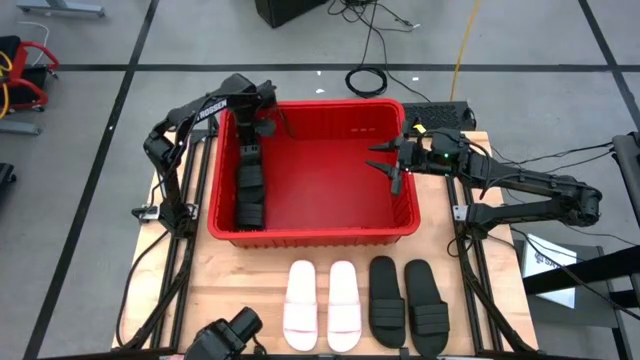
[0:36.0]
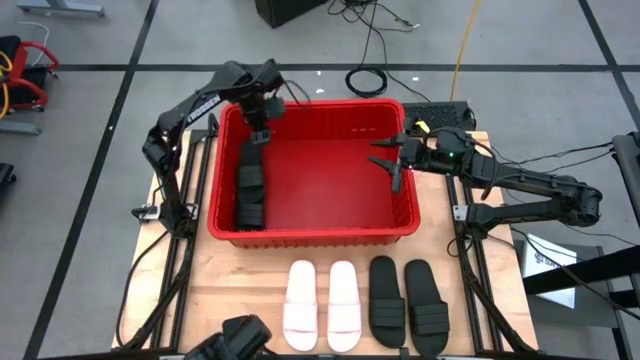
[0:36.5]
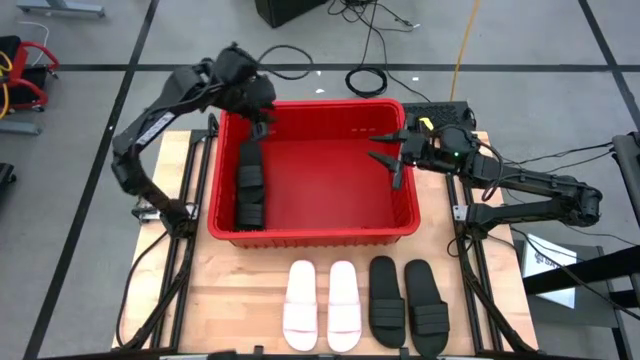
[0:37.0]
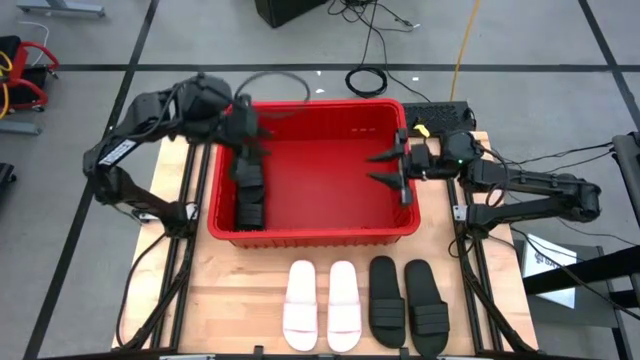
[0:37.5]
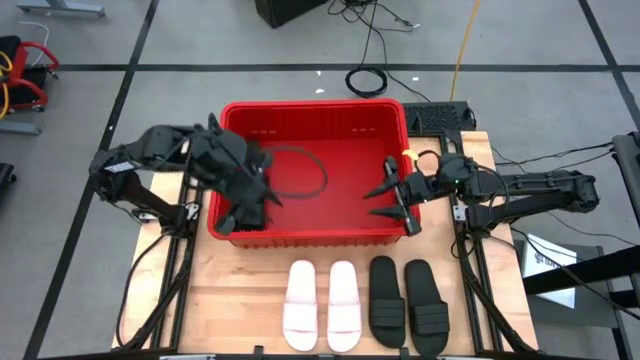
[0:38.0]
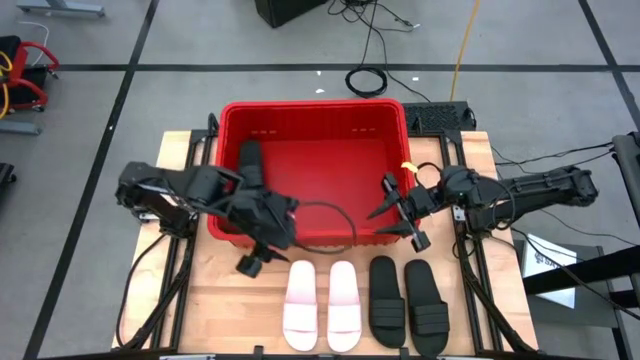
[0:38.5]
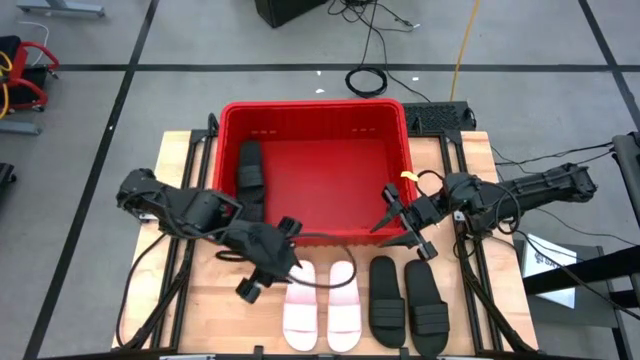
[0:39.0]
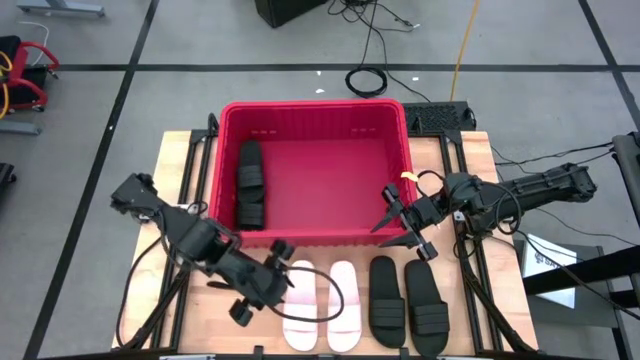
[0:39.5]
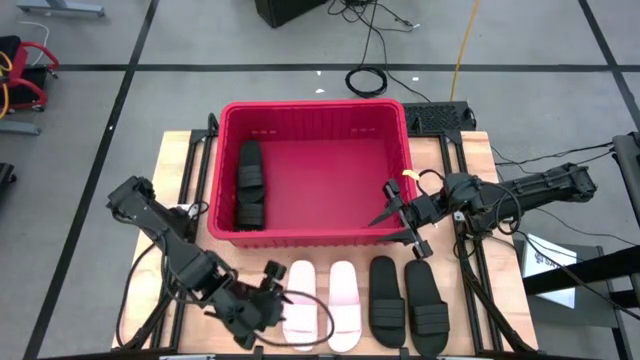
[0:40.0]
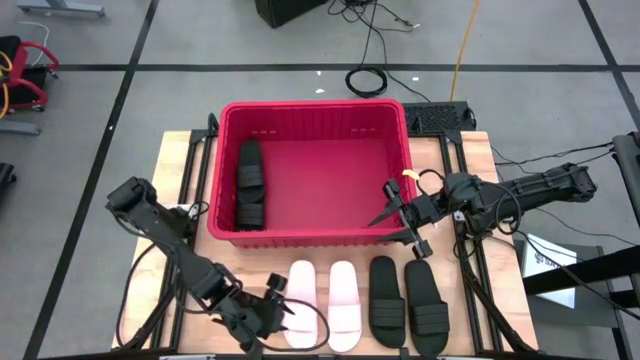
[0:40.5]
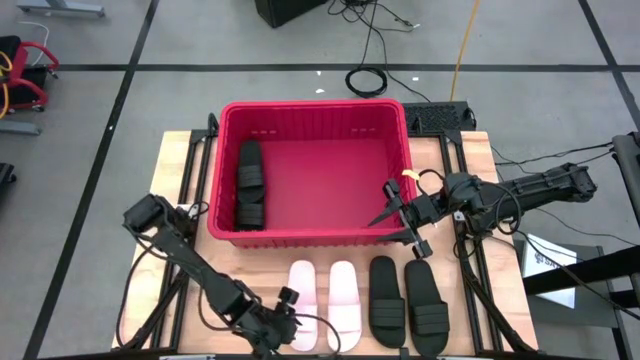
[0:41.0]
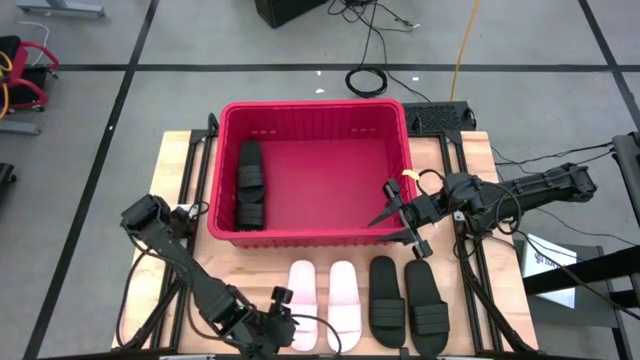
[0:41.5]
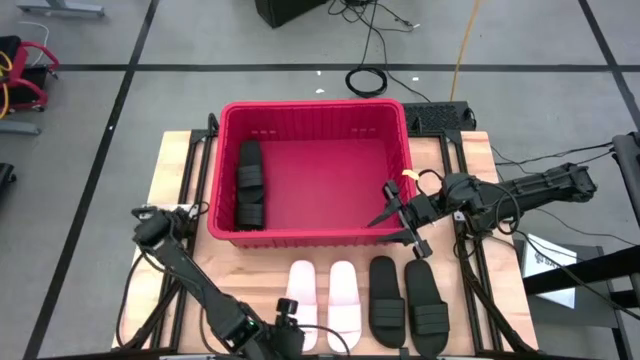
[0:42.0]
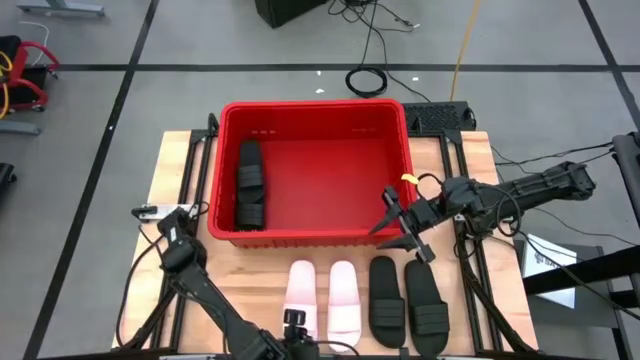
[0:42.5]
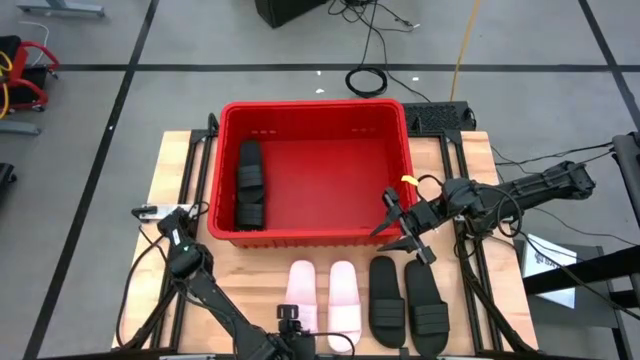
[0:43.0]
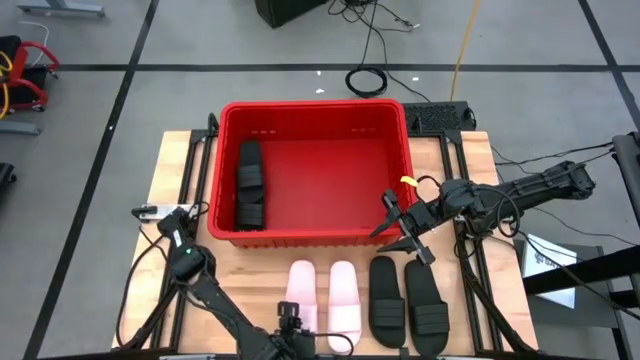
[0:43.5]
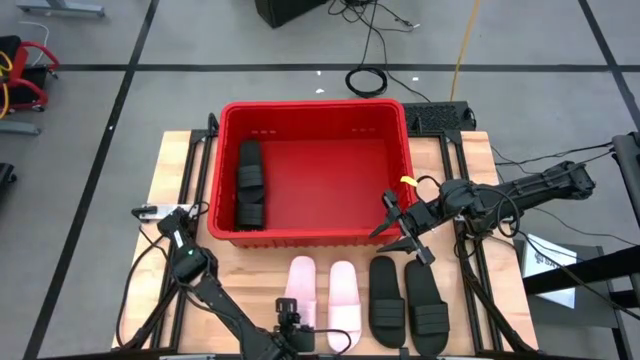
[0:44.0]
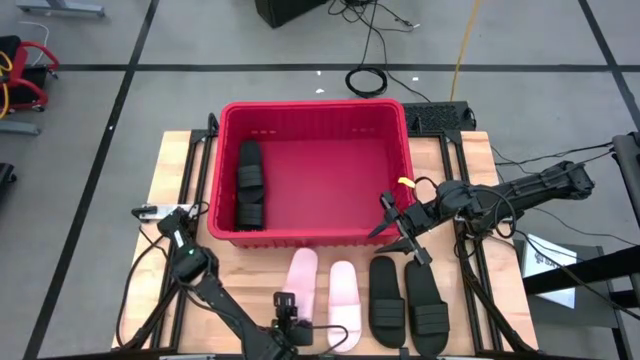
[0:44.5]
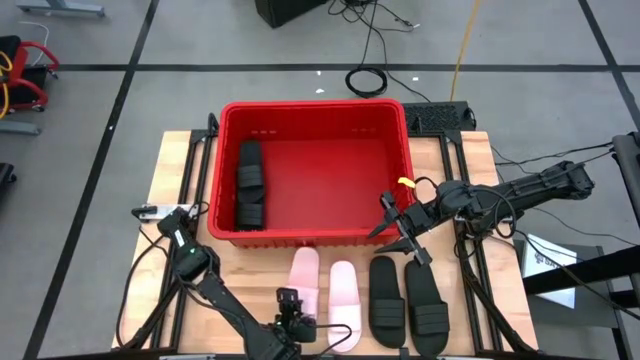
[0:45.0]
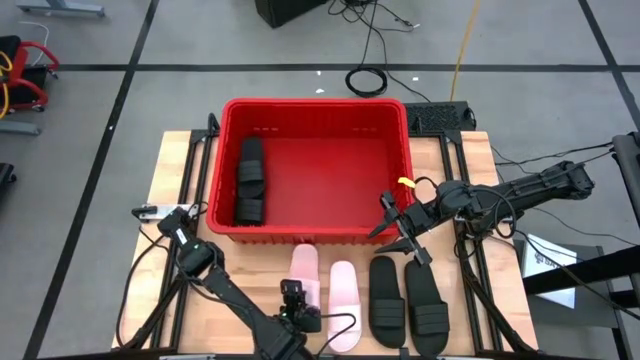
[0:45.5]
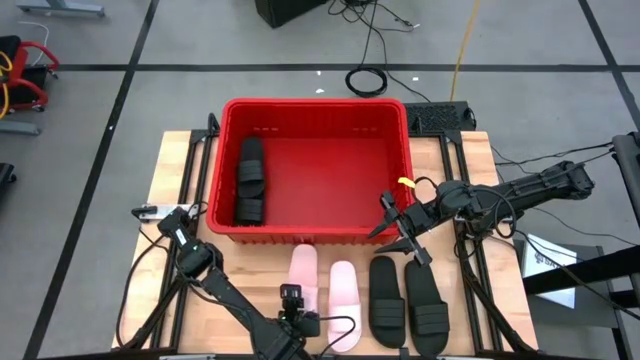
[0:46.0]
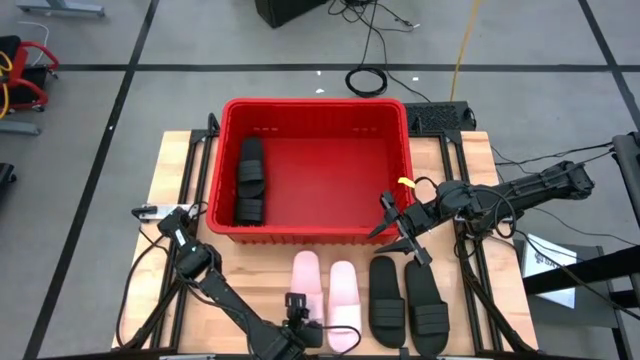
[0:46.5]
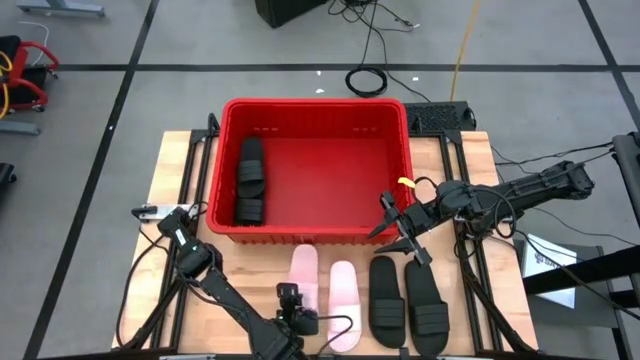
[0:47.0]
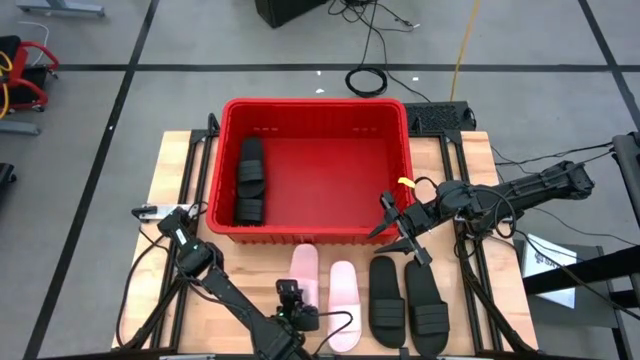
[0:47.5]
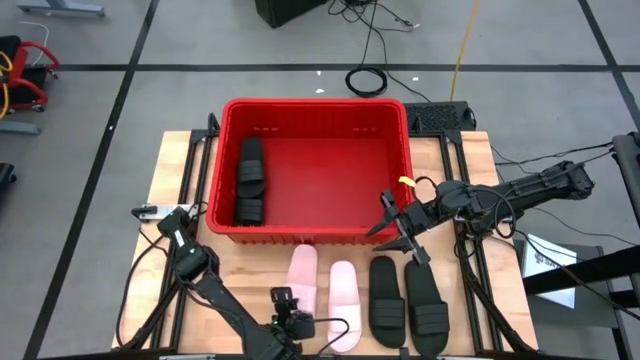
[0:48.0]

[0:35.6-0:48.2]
Task: Pick and place slides into bin
Put the white slipper into the red bin

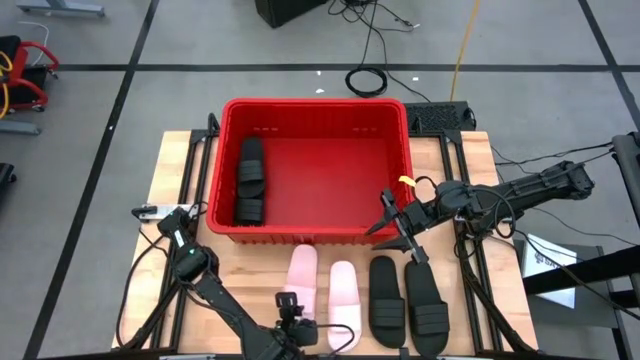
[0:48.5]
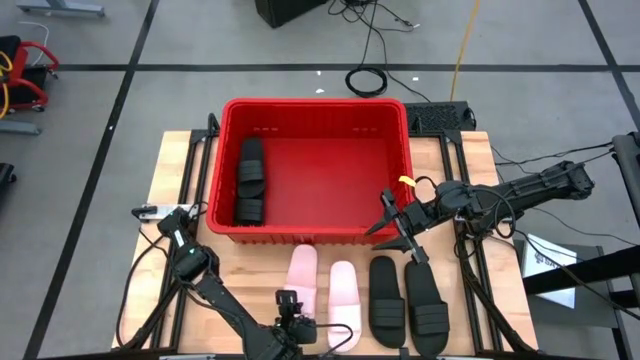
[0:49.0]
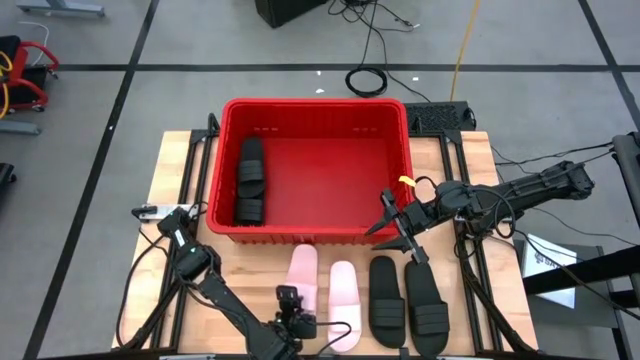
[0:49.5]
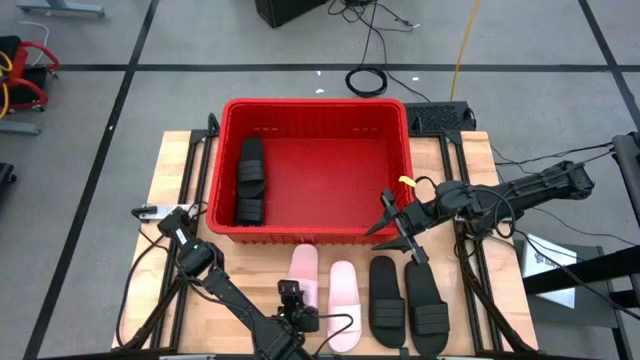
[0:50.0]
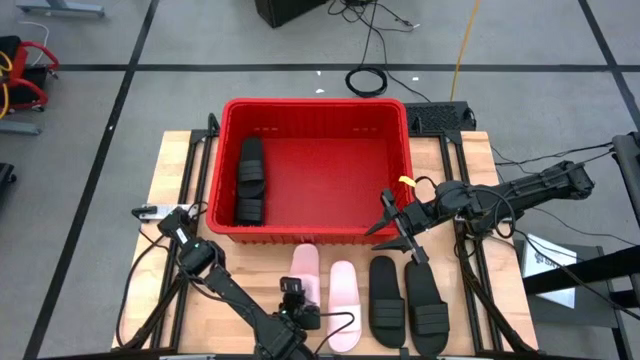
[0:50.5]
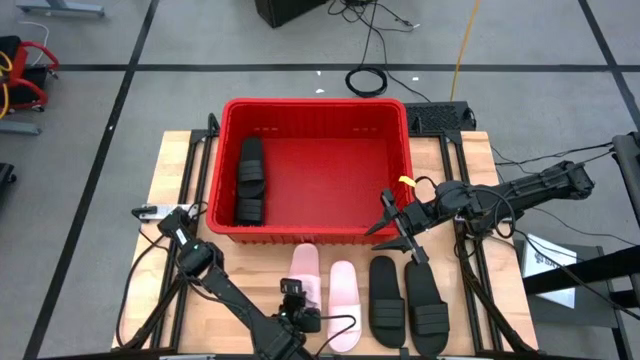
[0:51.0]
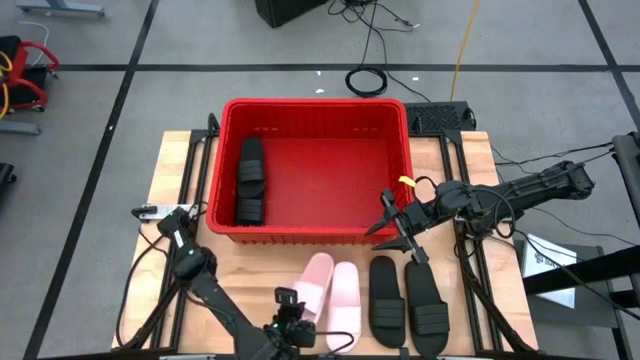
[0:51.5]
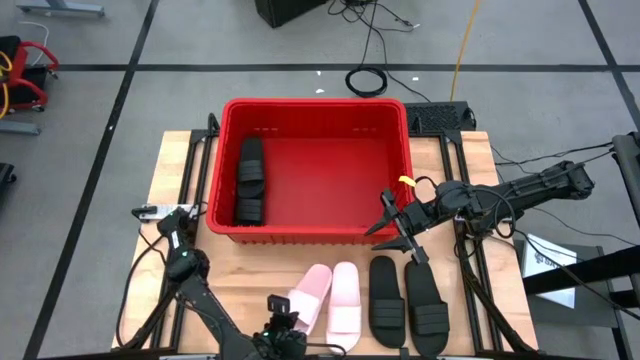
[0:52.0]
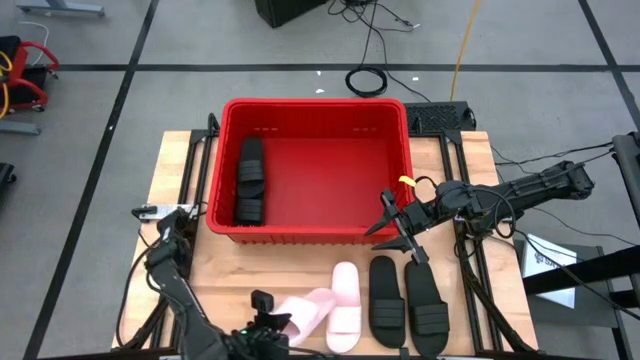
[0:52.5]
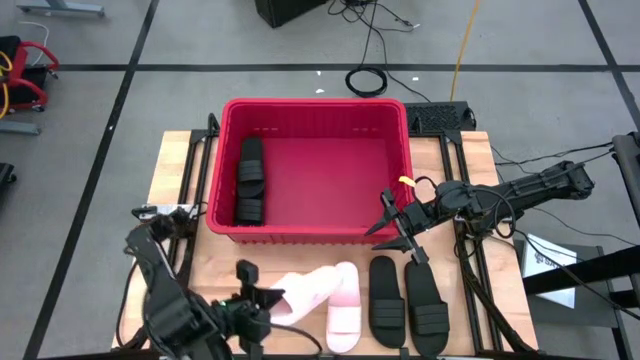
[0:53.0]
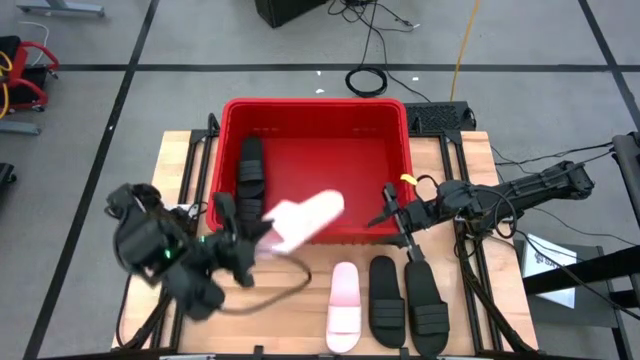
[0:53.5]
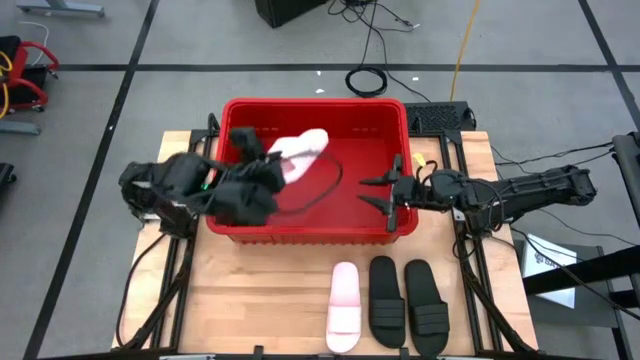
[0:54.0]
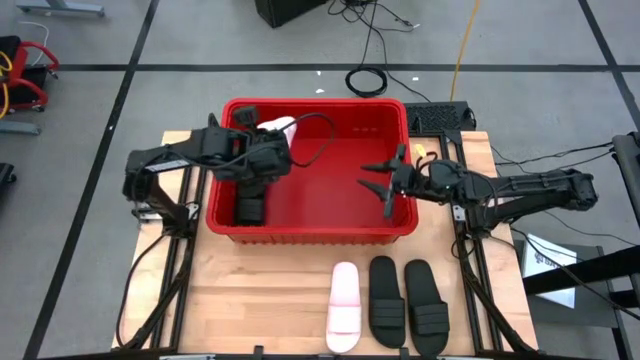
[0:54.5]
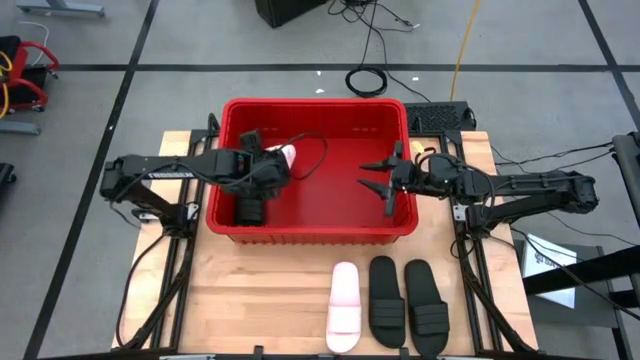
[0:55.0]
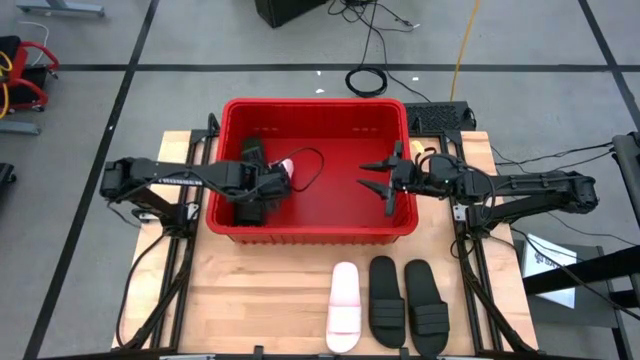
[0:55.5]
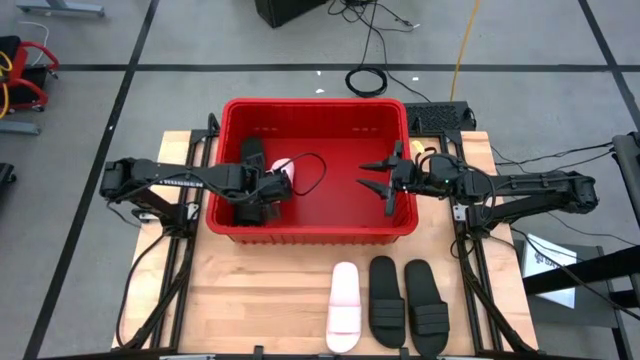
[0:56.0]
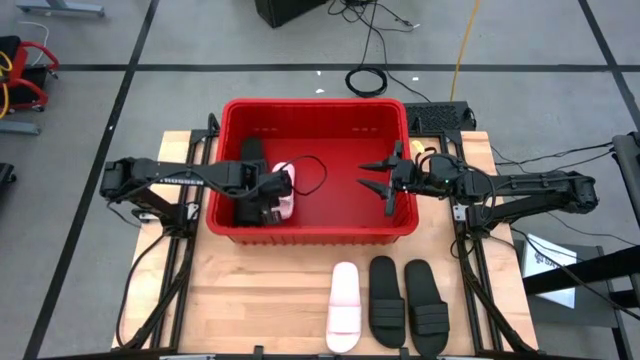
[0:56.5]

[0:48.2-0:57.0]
Put the white slipper into the red bin

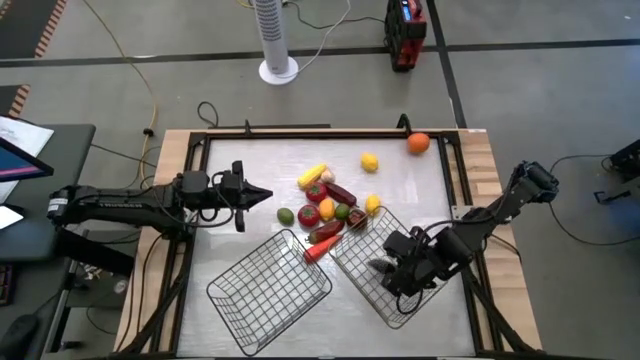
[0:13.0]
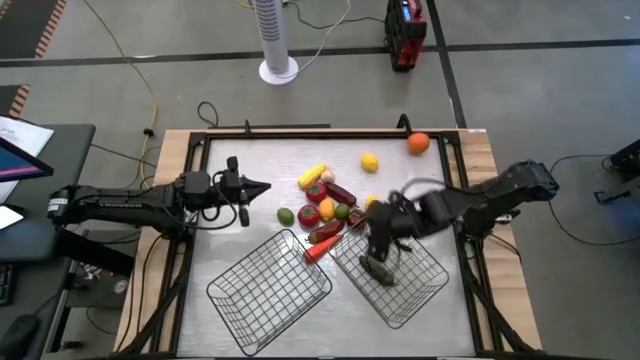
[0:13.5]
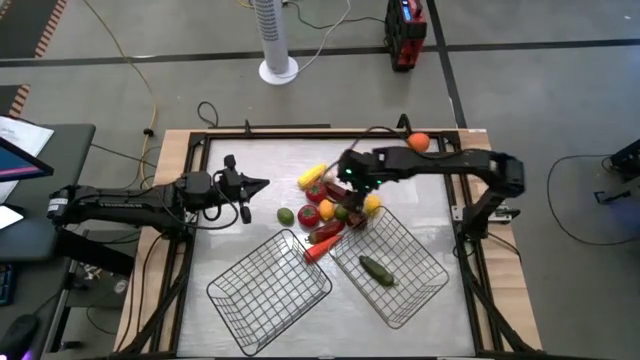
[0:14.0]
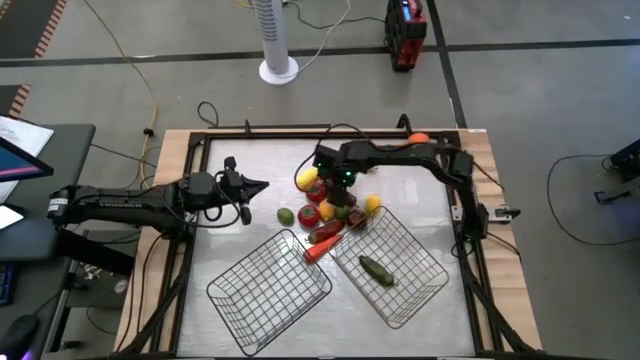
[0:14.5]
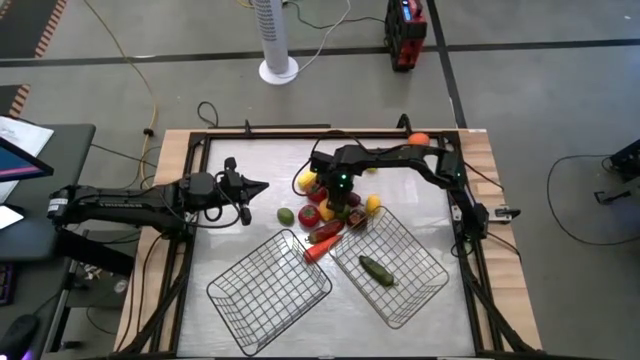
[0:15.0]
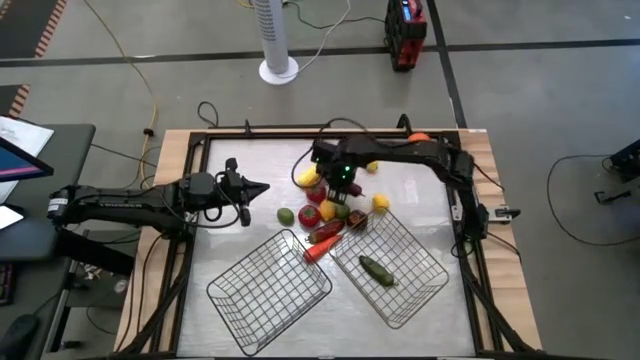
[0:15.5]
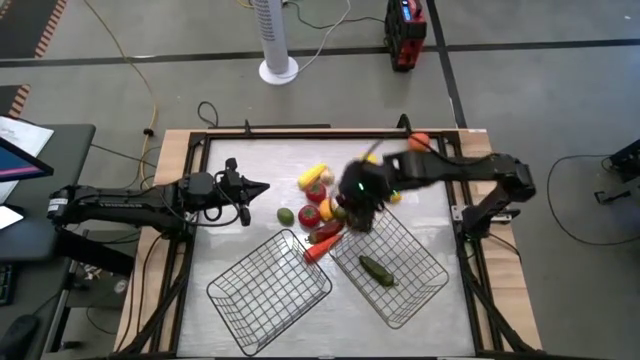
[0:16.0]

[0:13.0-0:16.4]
Task: Sort produce into baskets
Put the top red chili pepper into the gold wire basket
